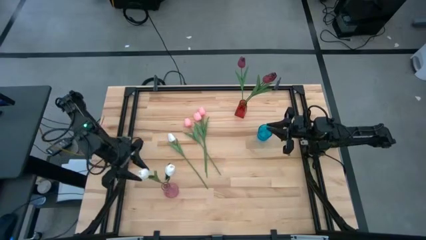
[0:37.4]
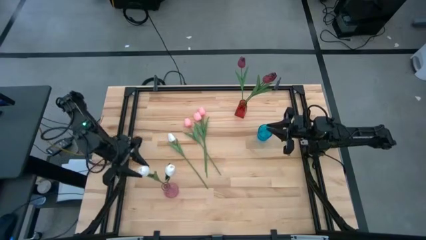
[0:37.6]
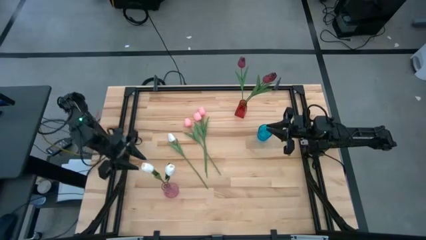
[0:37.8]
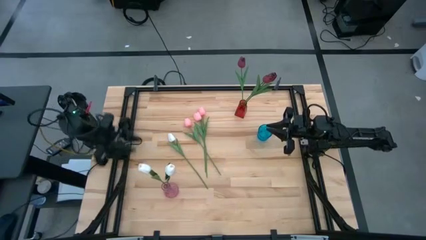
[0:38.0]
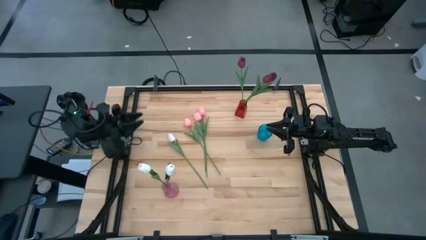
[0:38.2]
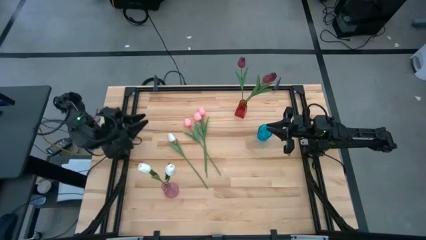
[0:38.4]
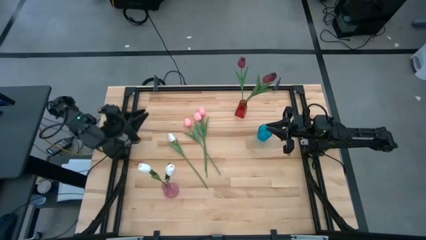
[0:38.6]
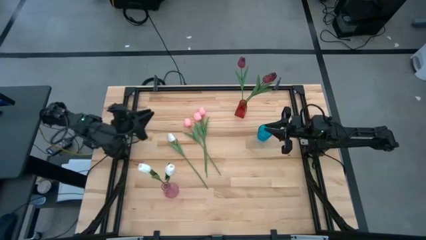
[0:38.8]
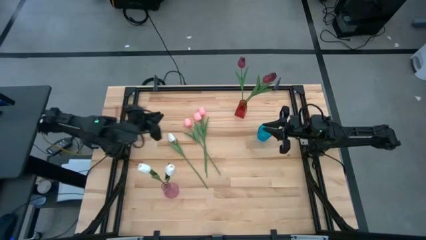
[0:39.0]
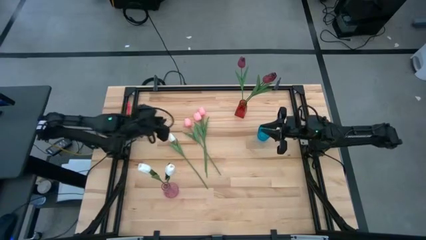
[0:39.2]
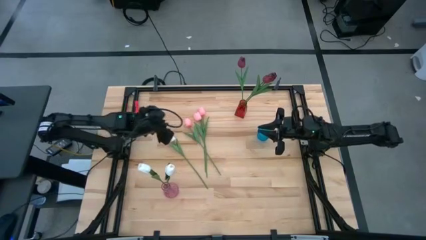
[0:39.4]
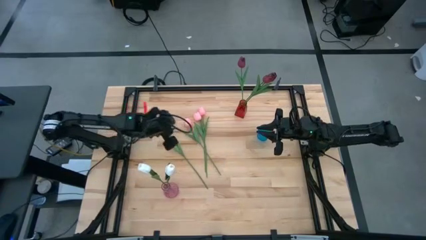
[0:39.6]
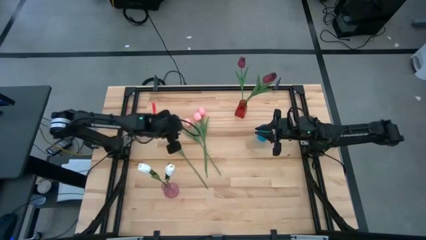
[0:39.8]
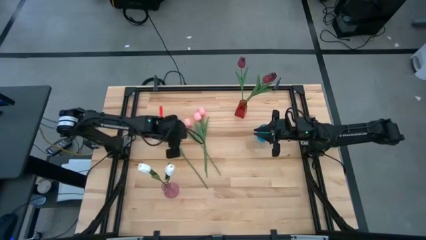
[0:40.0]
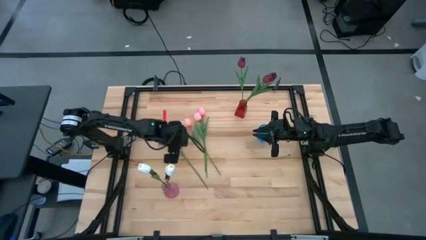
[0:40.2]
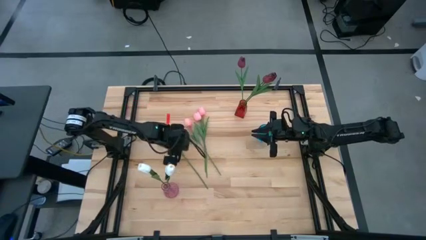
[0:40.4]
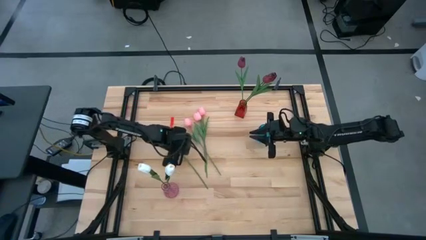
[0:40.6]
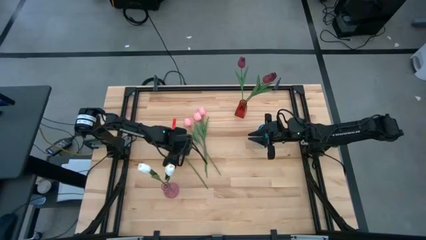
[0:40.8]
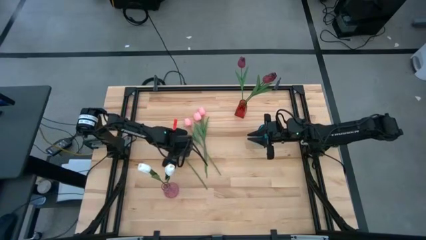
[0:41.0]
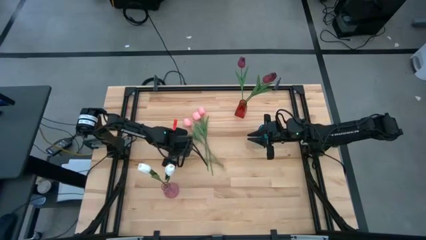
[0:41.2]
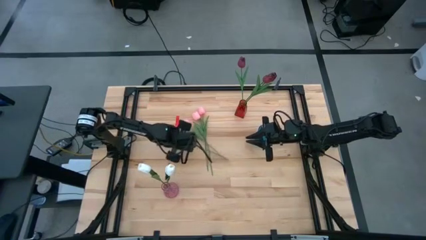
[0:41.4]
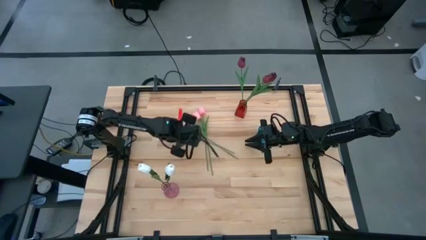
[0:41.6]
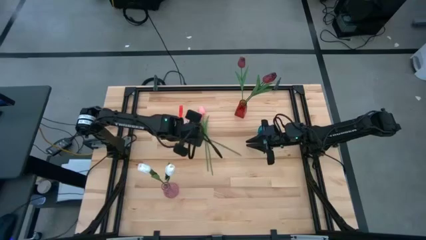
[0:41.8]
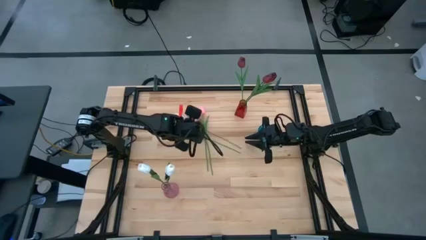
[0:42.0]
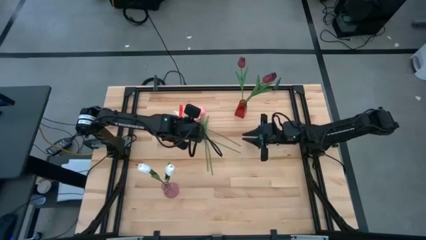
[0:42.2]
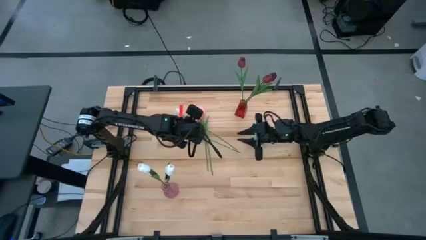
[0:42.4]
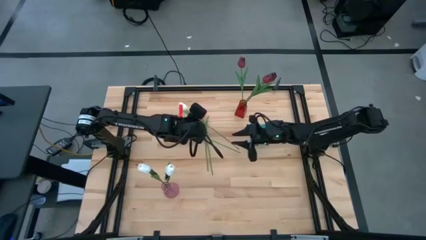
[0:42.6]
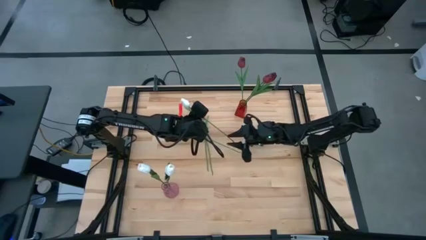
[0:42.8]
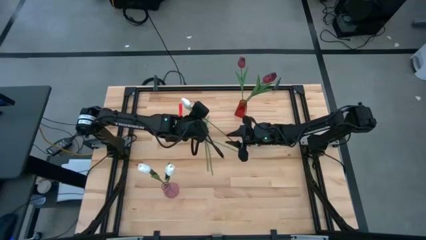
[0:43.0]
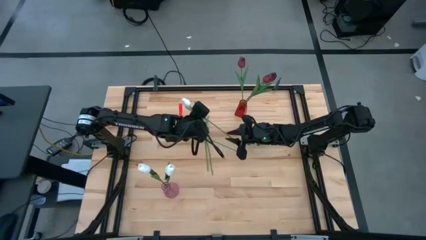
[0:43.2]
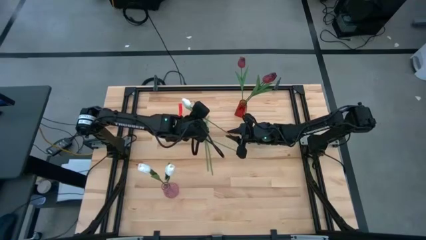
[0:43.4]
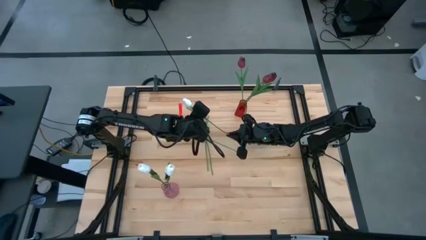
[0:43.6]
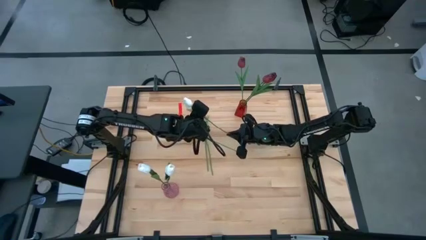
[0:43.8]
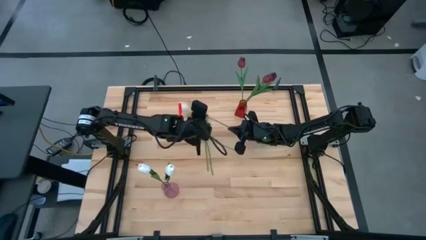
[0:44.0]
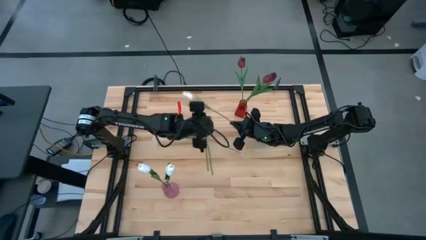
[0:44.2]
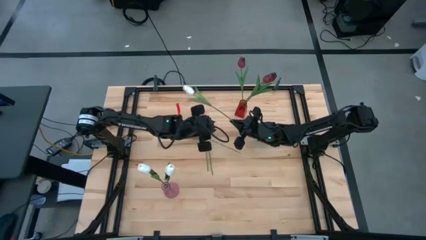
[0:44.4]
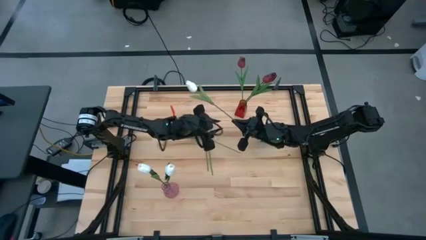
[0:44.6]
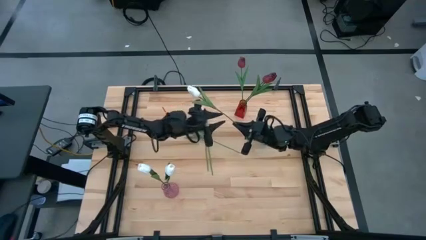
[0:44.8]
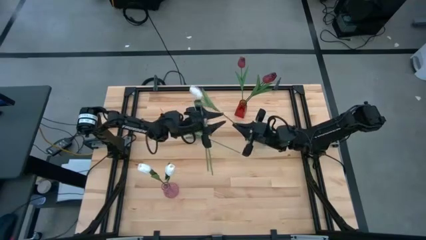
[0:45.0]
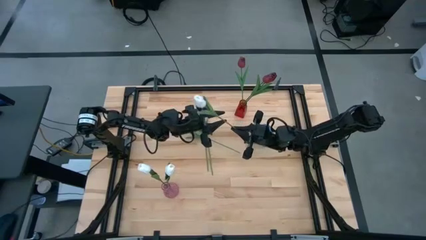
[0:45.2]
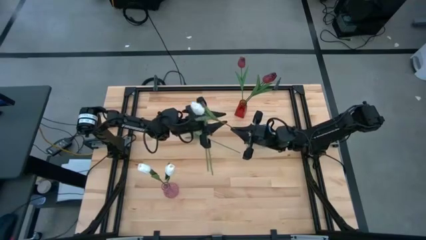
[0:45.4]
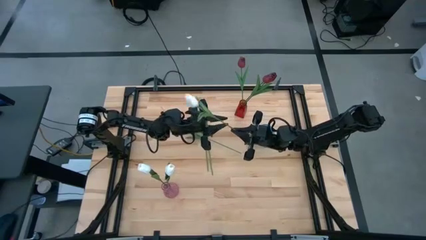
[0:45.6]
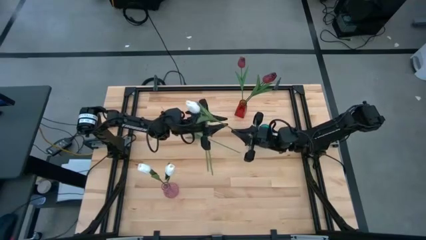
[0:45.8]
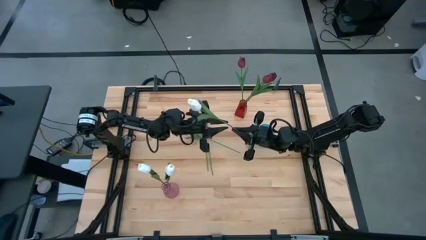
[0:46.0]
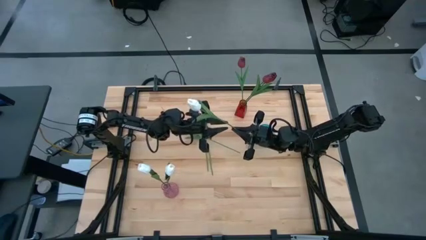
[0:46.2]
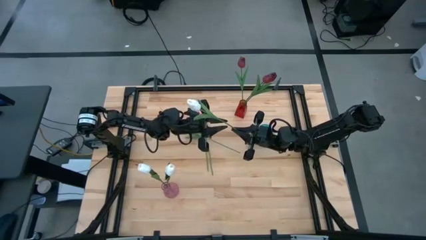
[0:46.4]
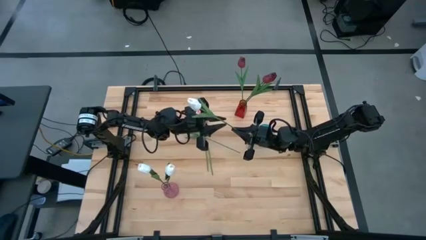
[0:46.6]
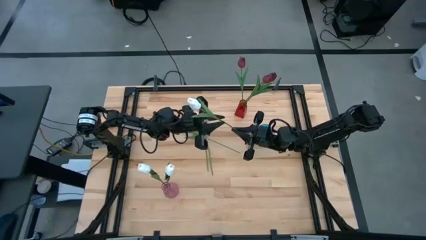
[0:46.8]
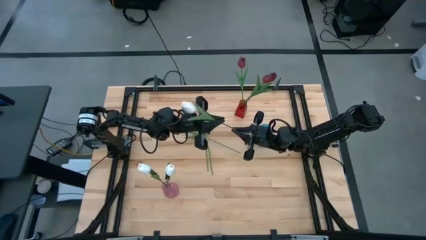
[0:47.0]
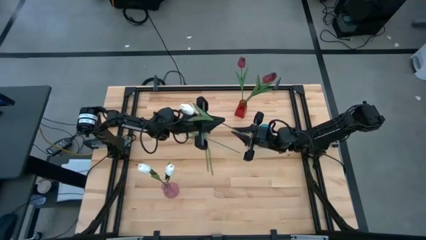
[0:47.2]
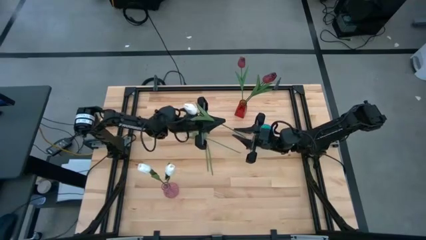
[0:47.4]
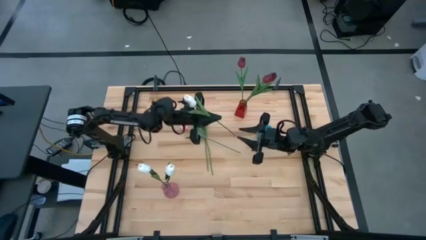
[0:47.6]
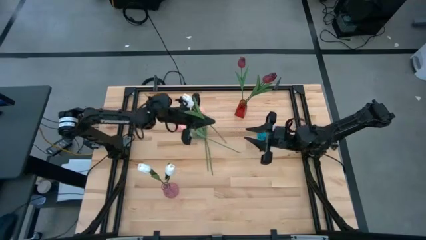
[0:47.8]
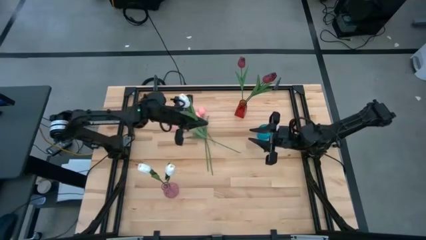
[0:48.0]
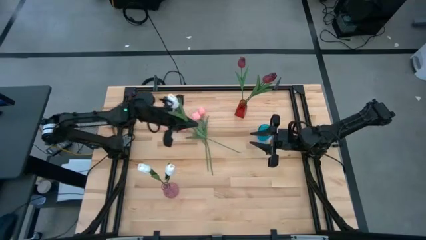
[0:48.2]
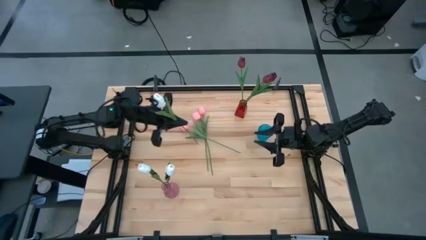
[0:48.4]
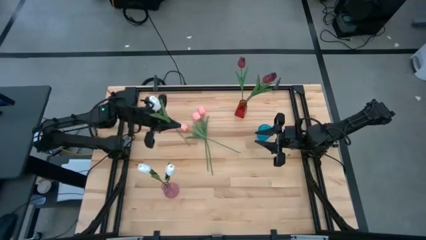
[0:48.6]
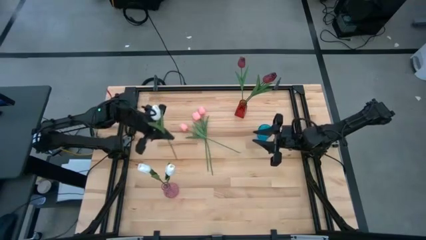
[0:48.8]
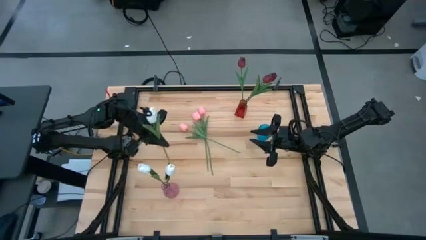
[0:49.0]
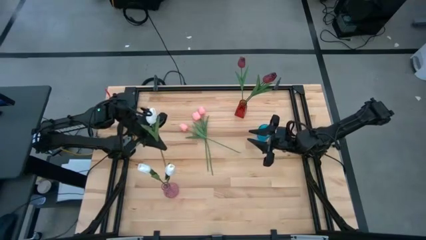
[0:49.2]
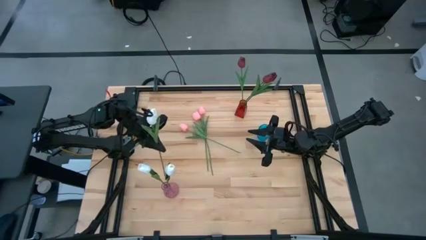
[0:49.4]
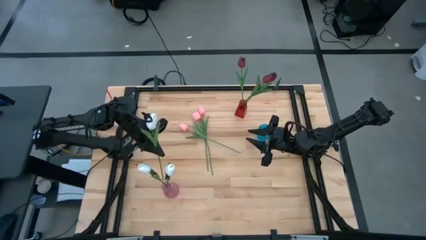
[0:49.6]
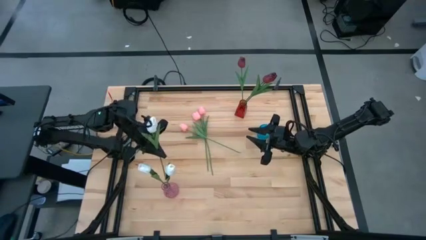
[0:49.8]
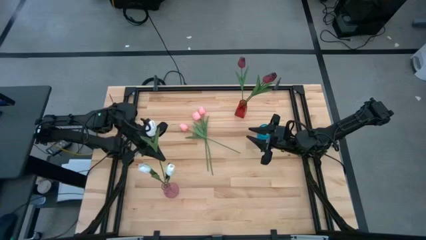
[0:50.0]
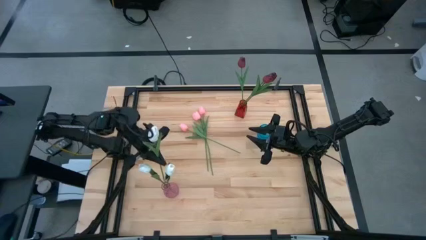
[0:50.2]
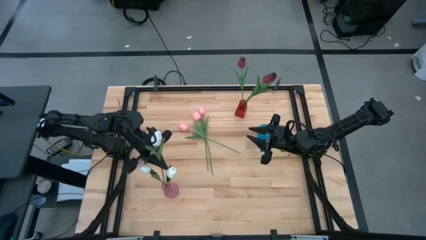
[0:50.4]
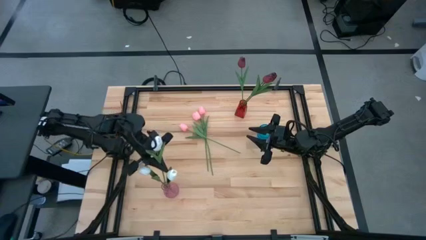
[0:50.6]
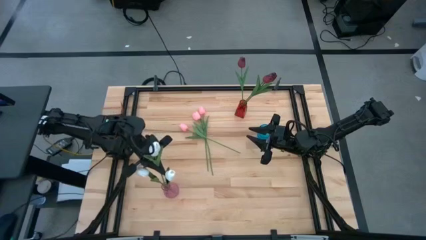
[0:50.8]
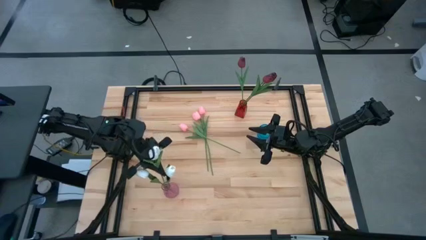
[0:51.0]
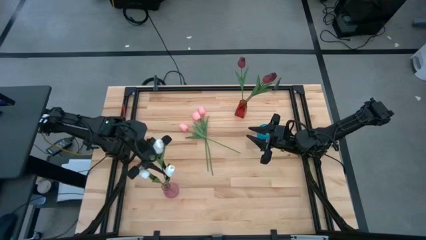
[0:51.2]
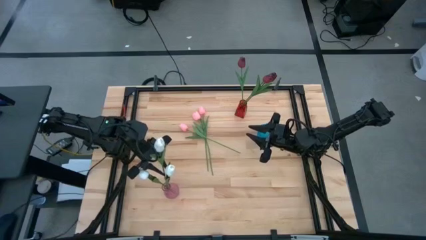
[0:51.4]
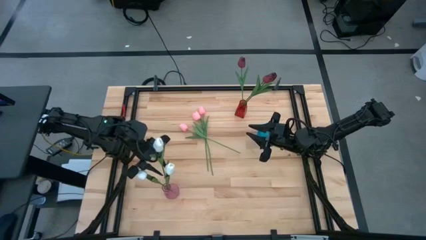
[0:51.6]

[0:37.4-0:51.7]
Task: Sort flowers into vase by color
Put the white tulip into the pink vase
